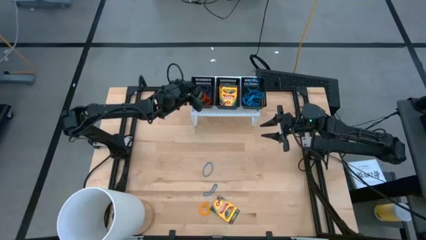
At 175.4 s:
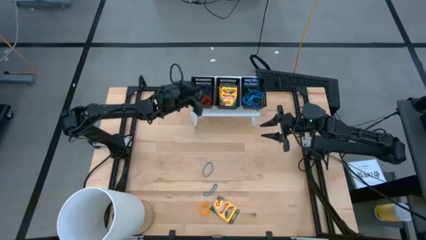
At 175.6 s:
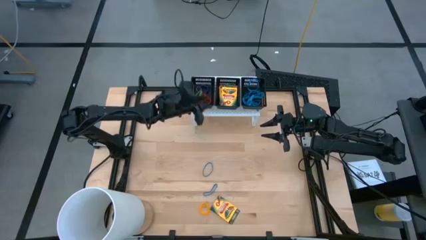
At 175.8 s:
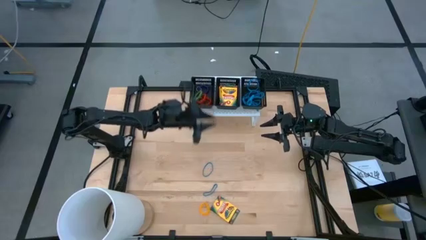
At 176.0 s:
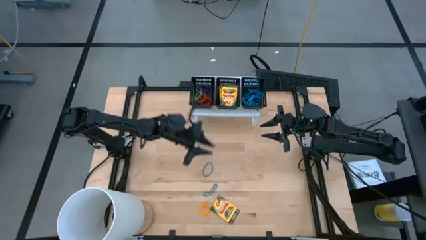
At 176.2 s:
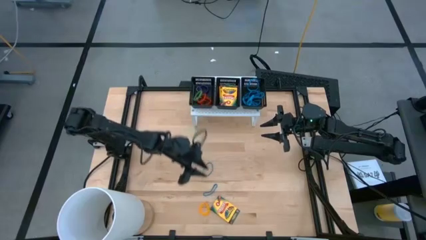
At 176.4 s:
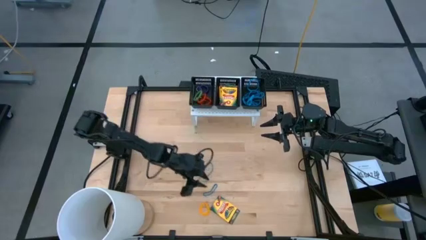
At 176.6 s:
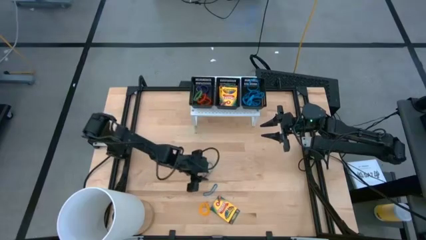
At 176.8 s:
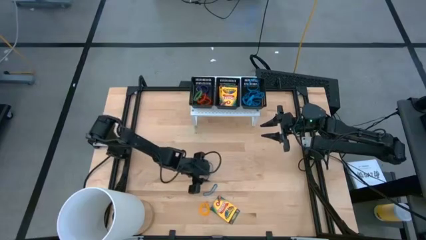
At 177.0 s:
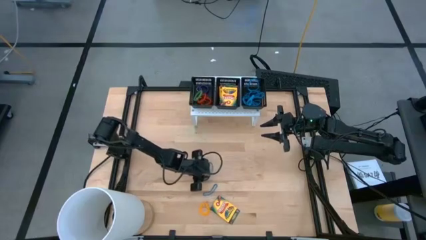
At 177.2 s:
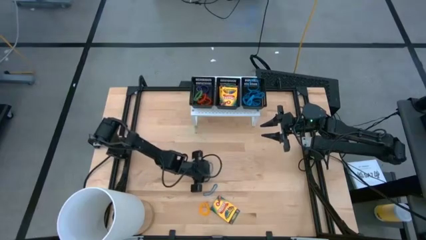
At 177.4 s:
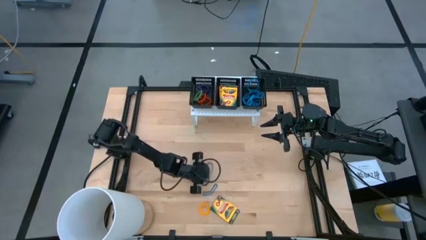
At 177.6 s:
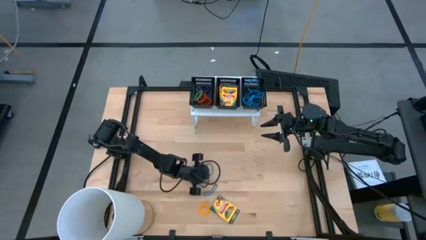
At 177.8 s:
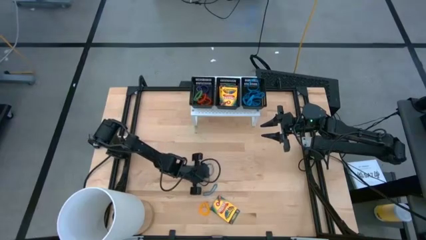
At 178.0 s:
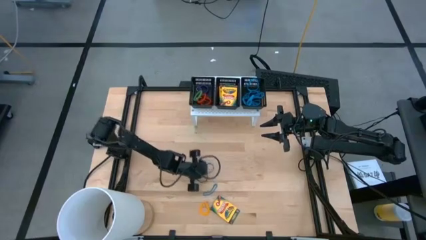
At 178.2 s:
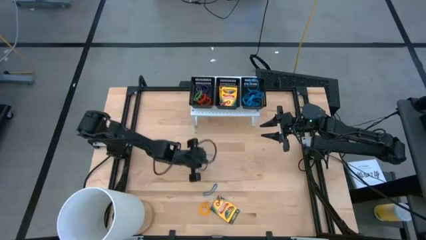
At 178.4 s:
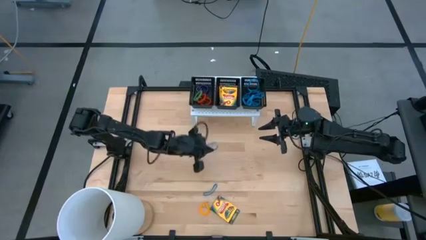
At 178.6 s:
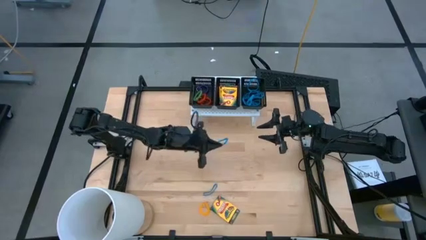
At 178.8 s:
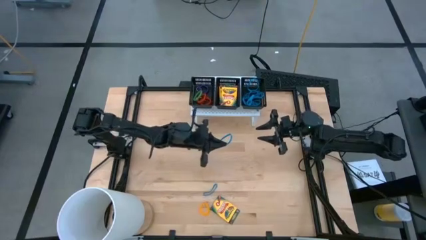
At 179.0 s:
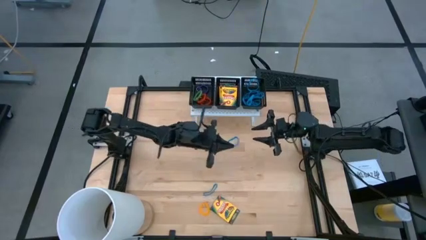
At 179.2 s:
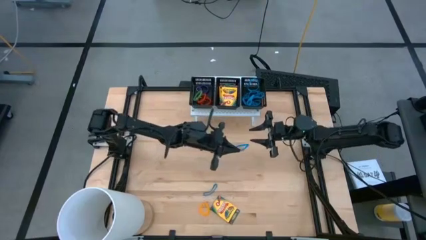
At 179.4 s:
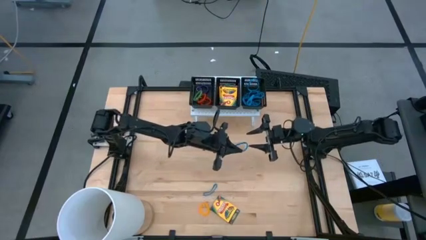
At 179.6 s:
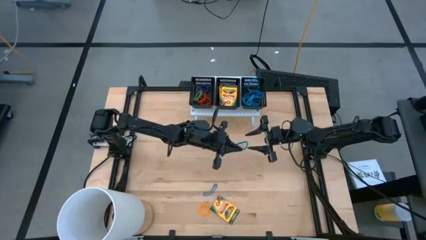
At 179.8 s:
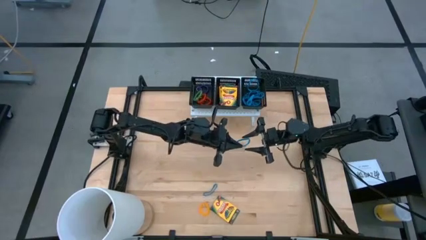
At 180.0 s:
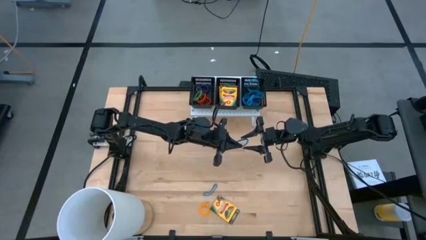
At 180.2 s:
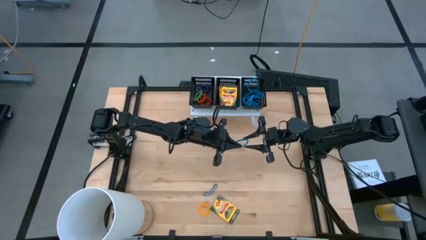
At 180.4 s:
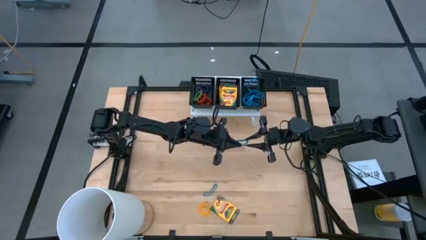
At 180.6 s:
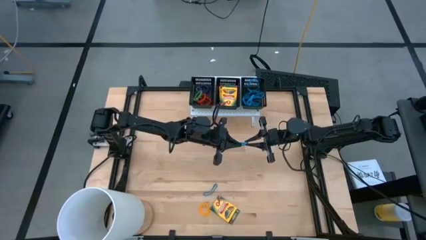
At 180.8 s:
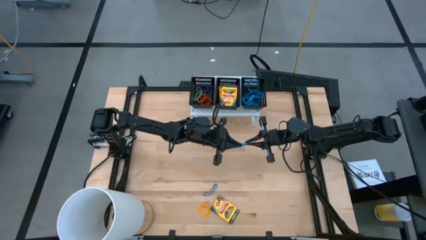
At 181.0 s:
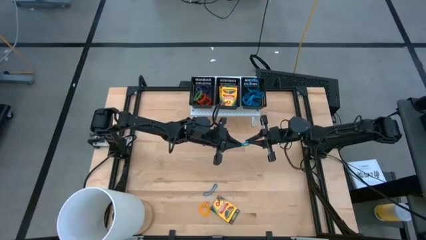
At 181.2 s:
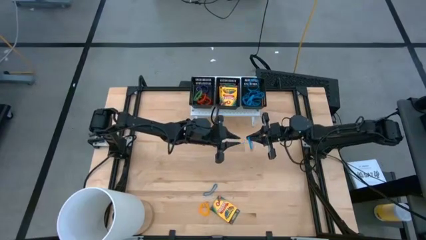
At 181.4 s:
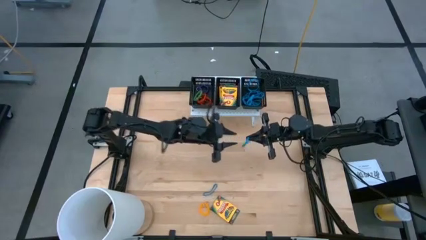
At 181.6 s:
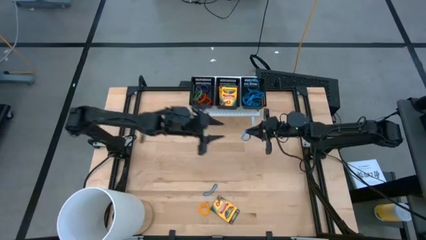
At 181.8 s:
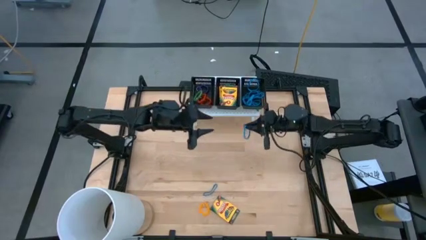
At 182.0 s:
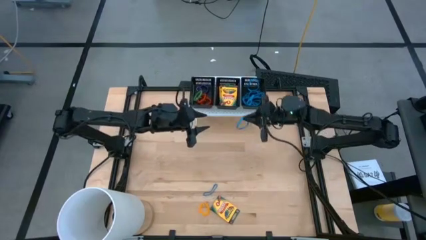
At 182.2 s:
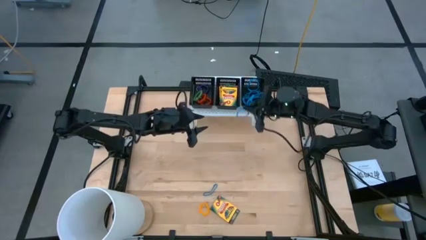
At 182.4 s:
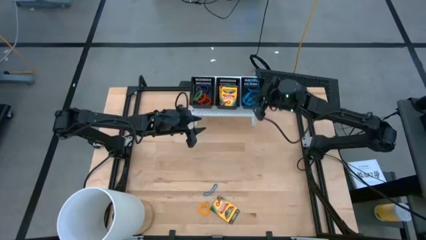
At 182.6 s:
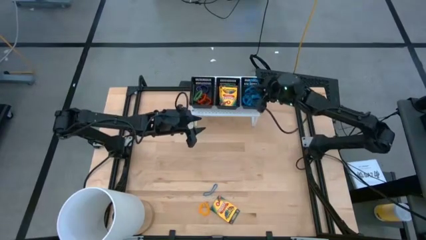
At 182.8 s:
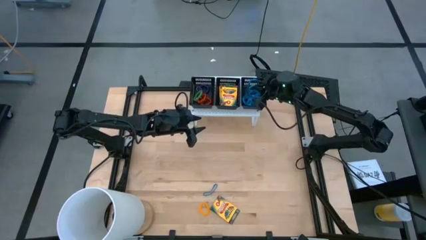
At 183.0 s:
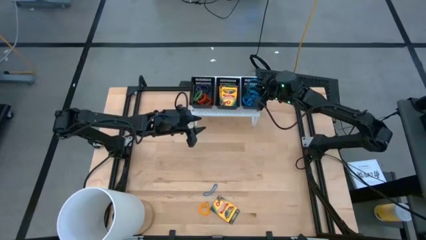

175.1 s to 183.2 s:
Task: Pick & Place Office Desk Supplies
Put the blue rubber band into the right black bin on the shelf

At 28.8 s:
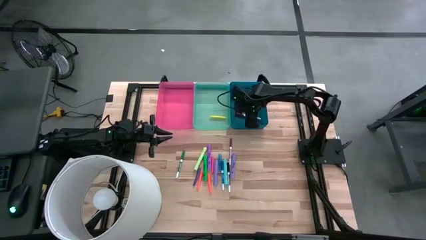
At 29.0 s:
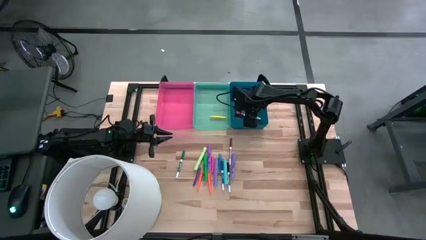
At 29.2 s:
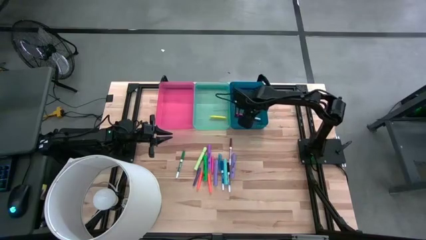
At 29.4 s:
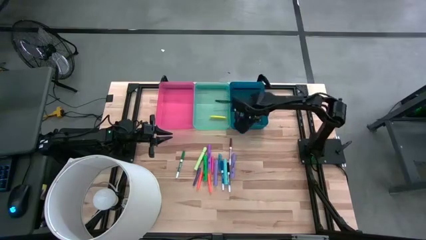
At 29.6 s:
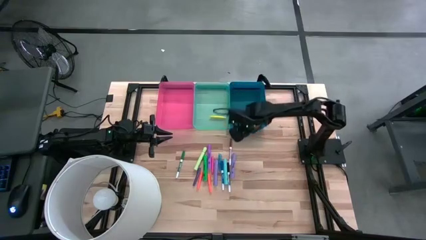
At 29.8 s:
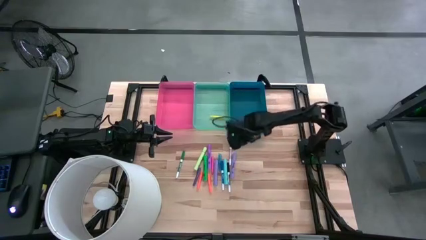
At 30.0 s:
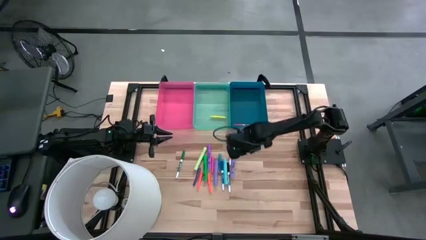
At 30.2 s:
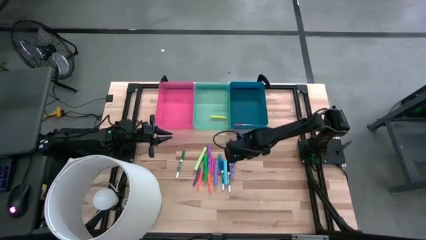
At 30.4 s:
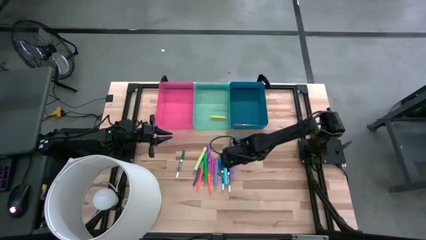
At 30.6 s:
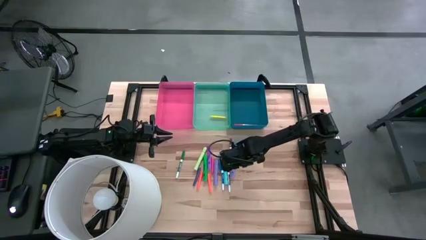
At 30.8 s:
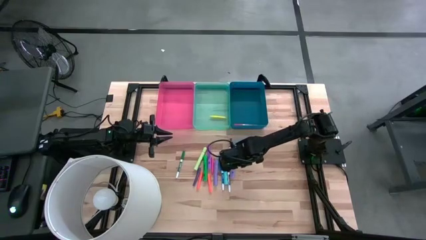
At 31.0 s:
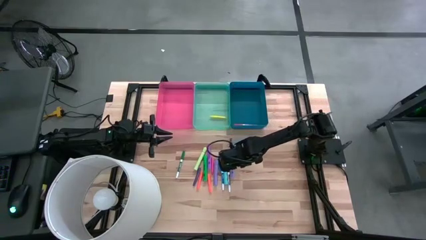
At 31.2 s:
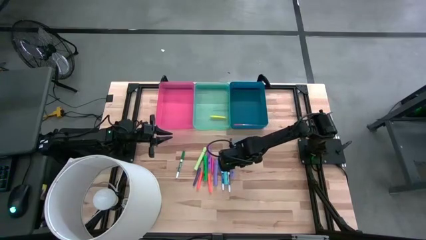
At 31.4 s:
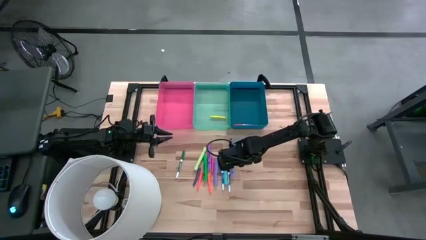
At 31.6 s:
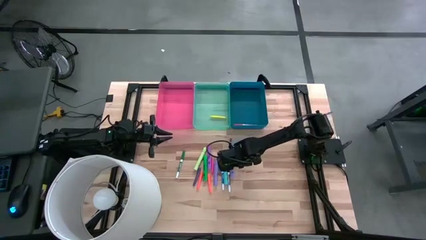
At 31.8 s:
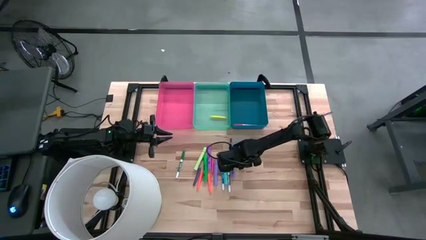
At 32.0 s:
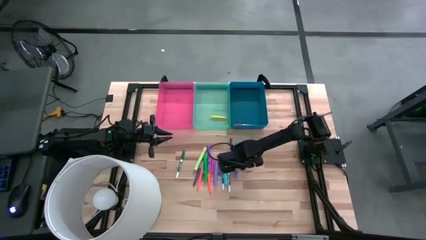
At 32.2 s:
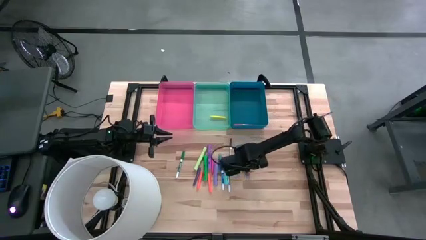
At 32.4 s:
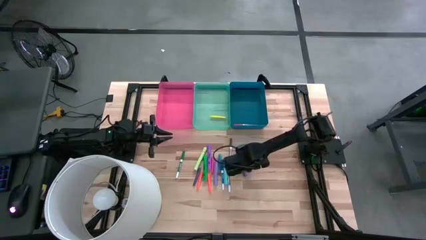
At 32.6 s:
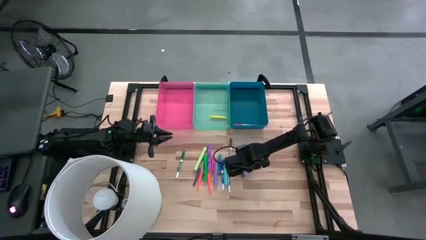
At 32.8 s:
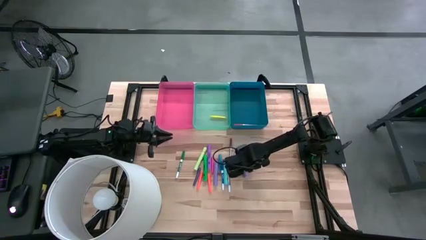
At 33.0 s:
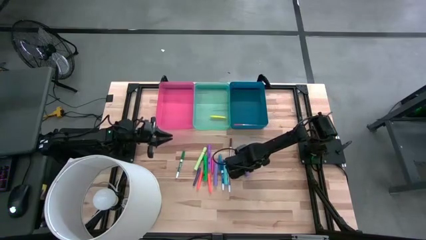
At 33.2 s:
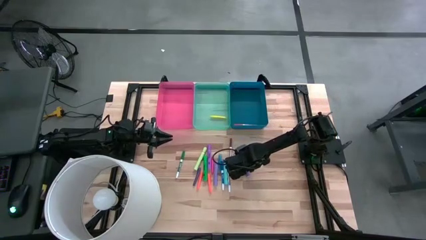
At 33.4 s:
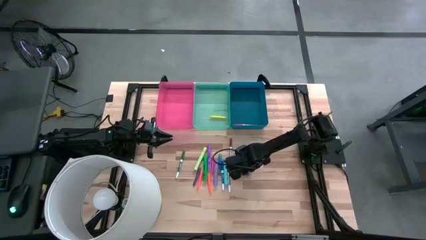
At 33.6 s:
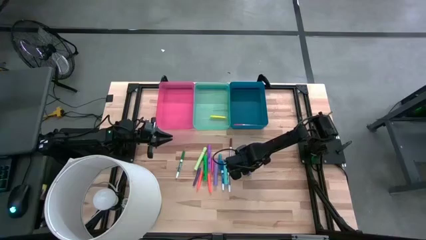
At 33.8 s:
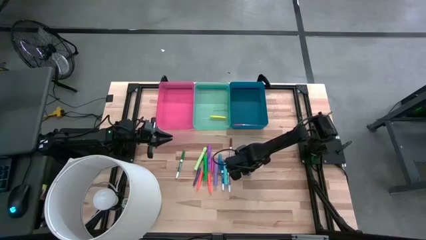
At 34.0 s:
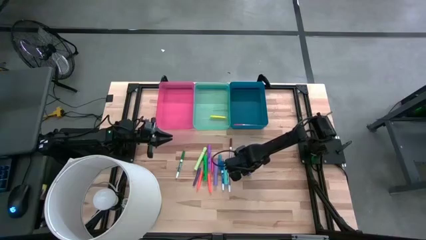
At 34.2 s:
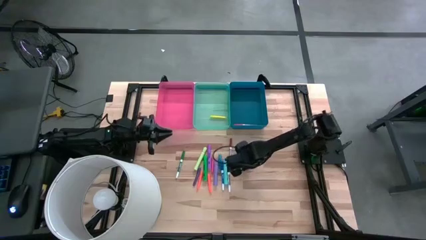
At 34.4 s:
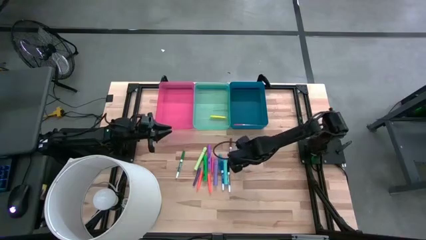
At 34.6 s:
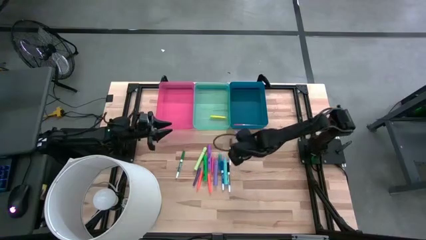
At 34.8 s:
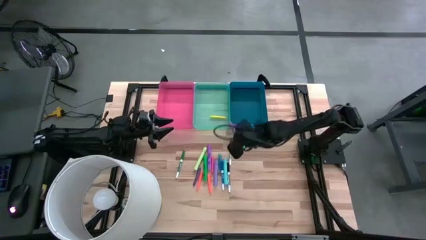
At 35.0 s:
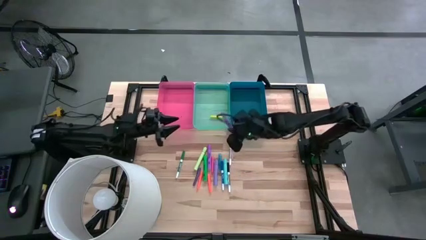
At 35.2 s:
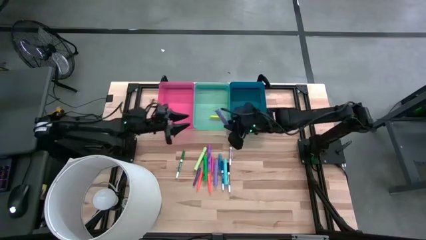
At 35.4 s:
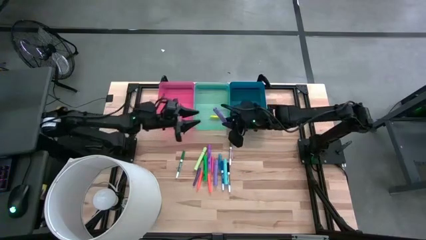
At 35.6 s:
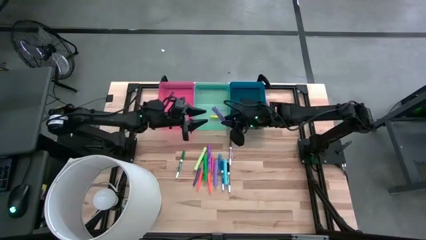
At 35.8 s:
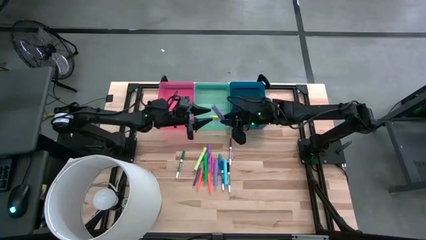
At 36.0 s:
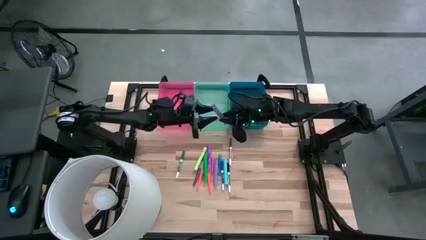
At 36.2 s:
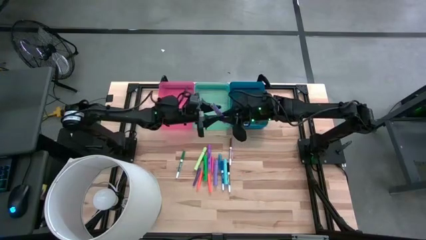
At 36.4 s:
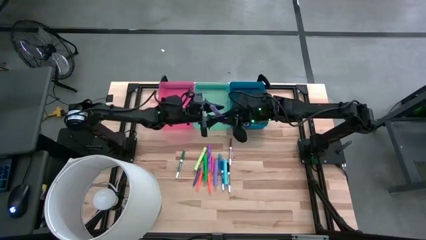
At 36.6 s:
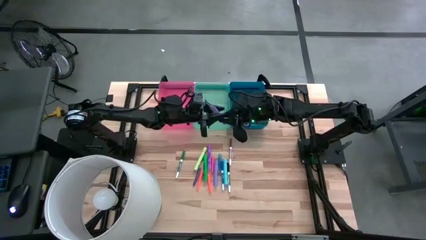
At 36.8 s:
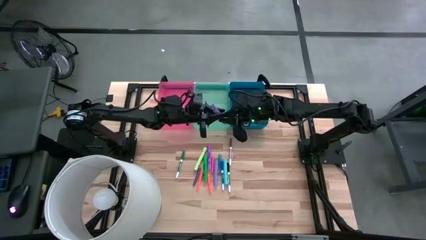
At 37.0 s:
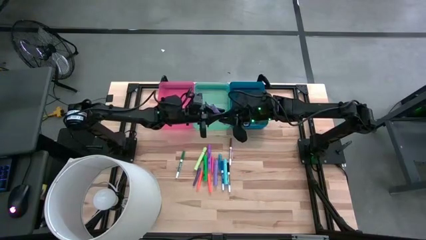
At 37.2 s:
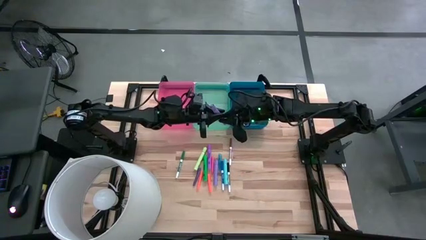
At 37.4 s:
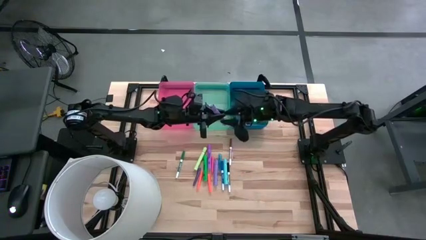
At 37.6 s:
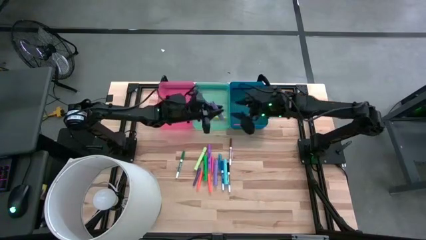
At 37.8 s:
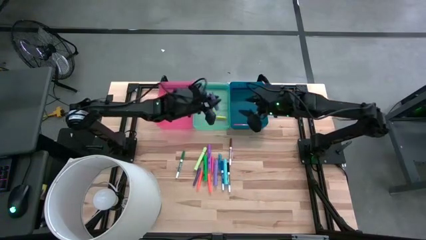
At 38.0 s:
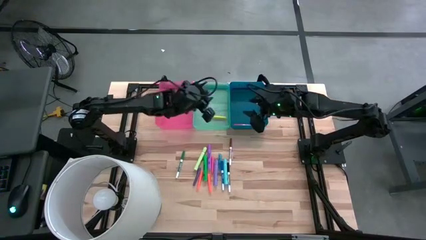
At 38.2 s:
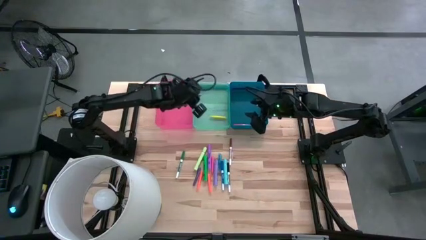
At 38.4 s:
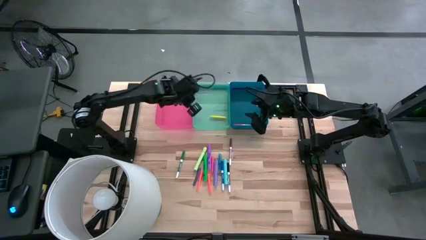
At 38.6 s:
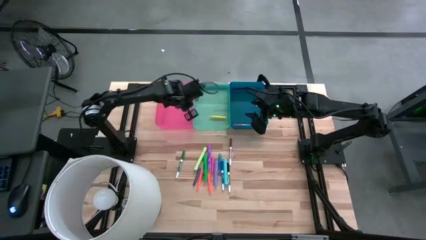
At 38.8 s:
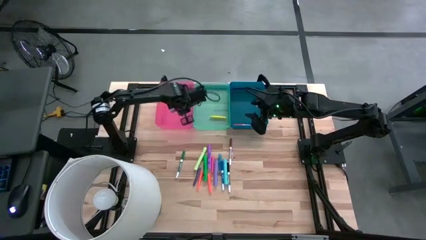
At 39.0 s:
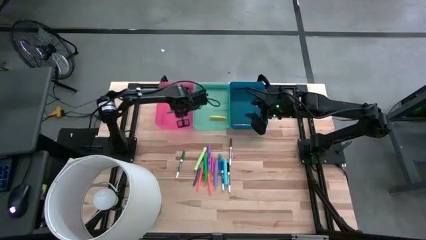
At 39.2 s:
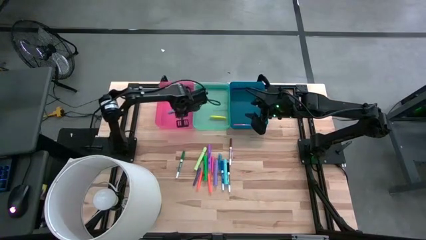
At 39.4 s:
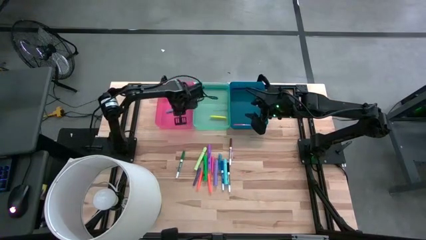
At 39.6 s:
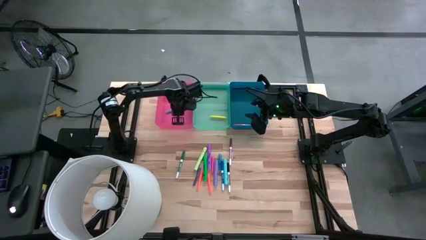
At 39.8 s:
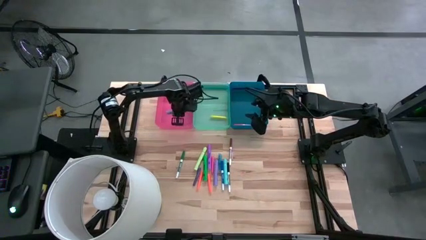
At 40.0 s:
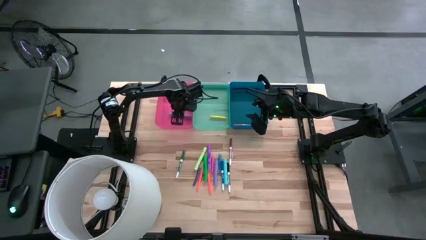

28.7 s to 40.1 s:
Task: Pick & Place Markers
Put the purple marker into the red bin
